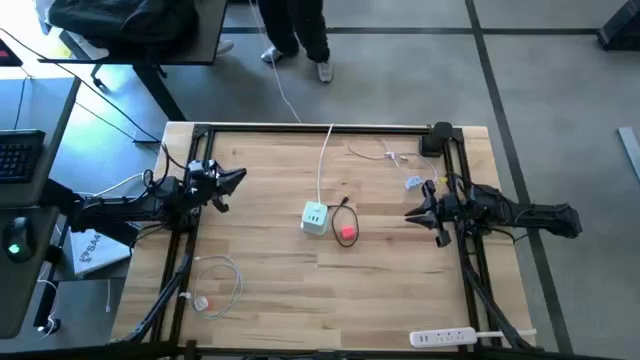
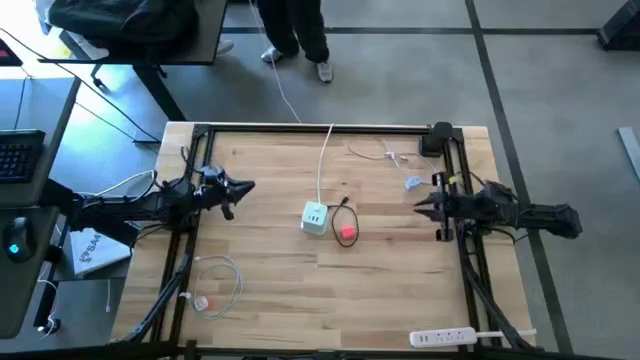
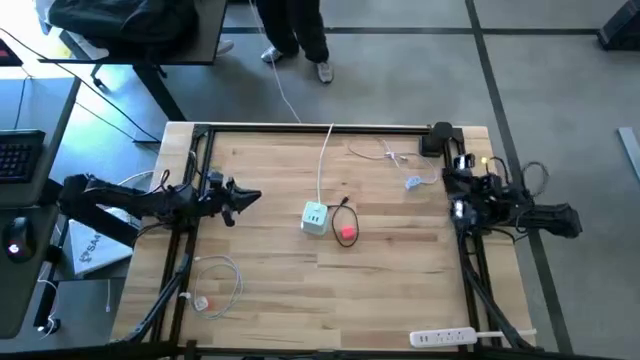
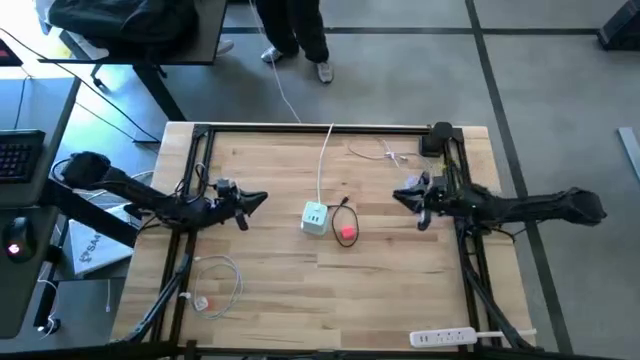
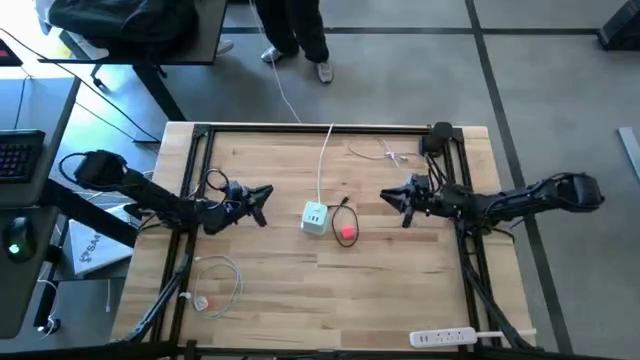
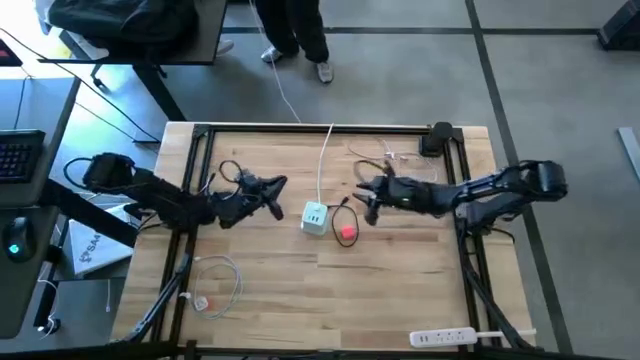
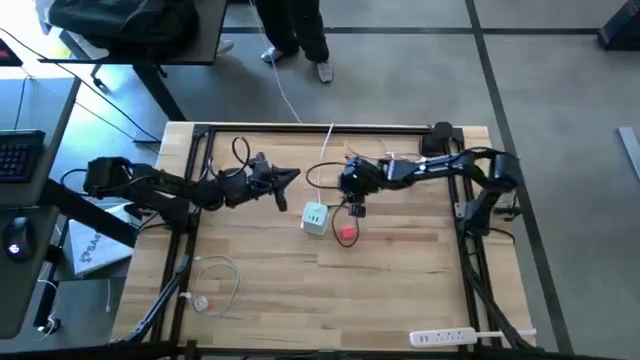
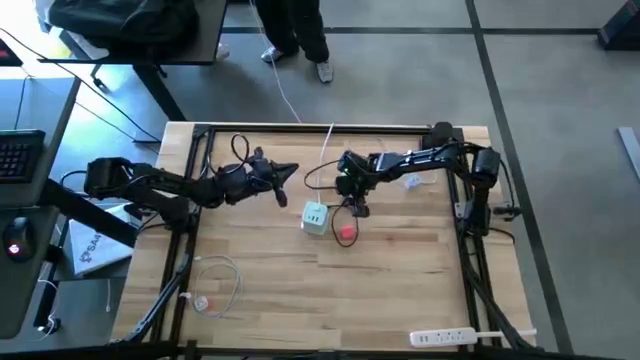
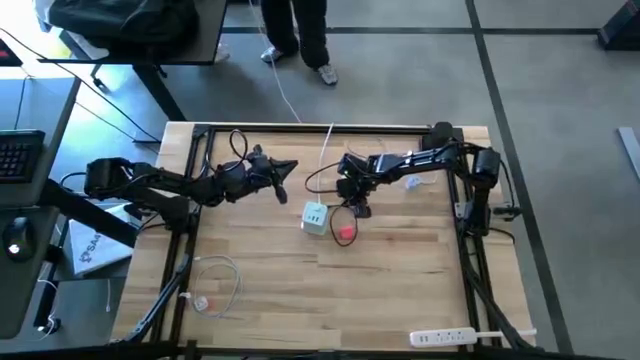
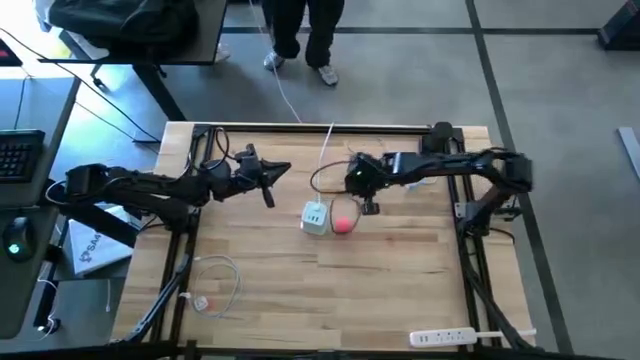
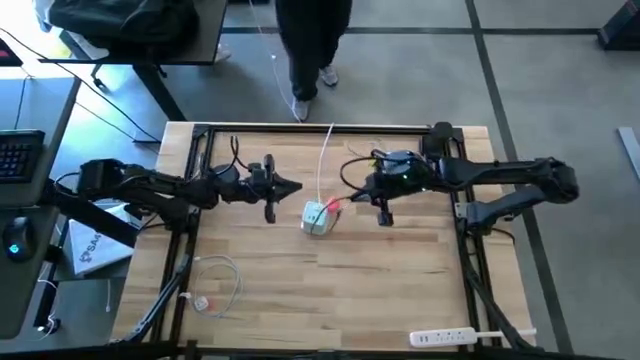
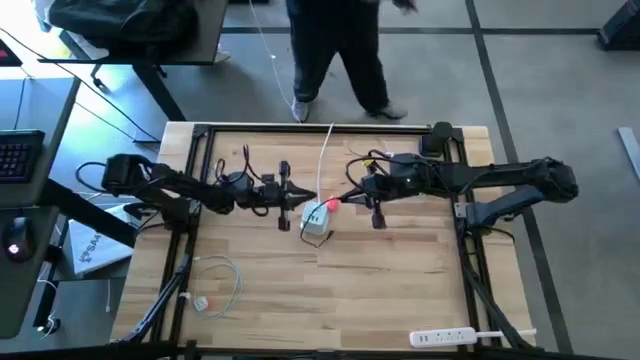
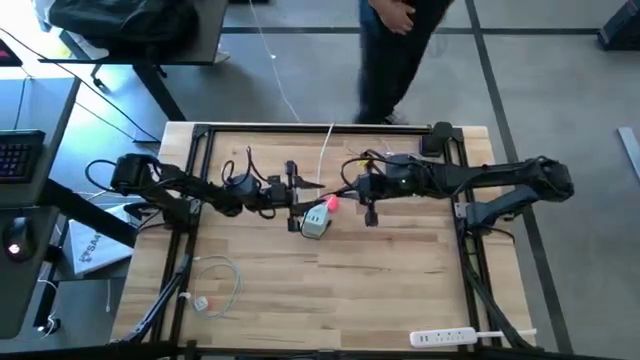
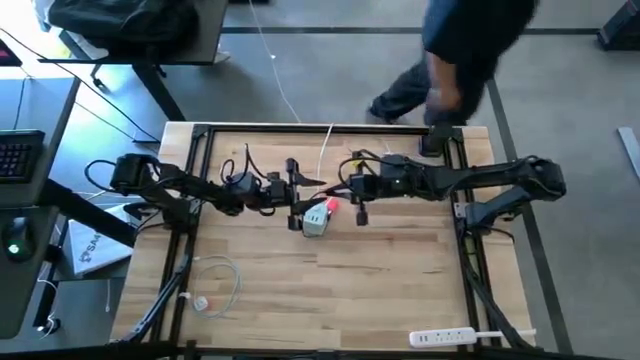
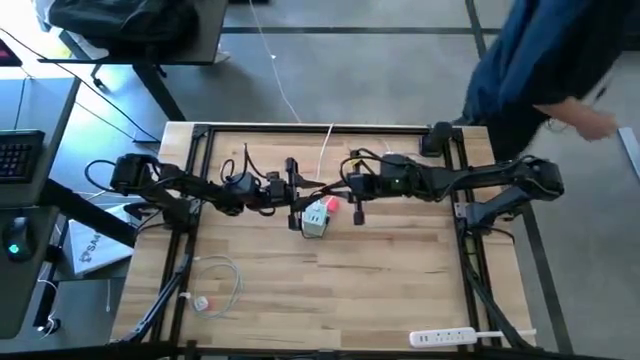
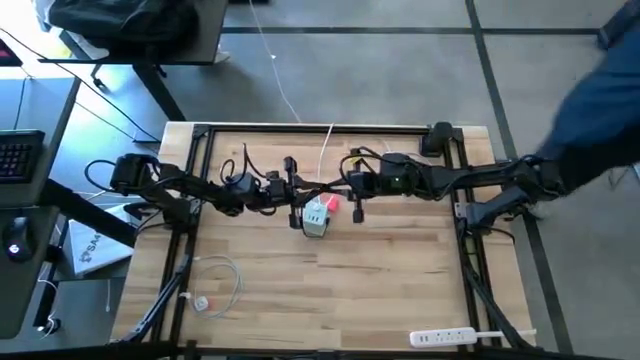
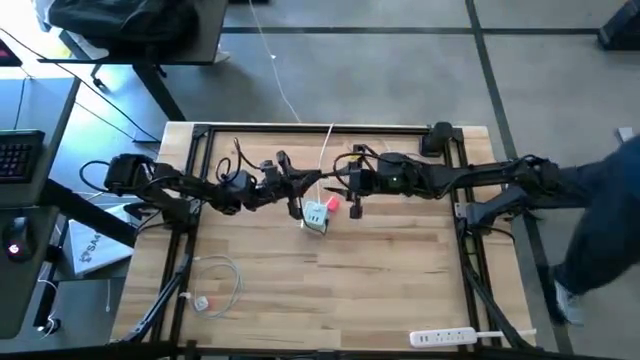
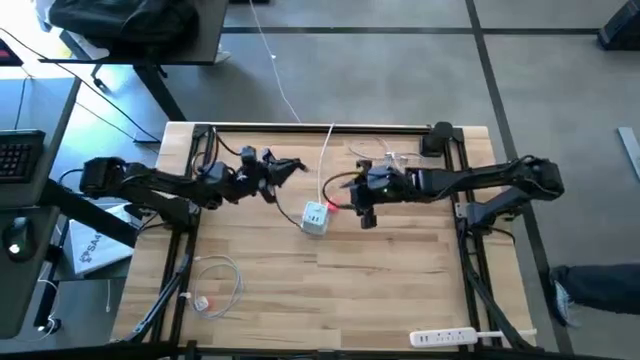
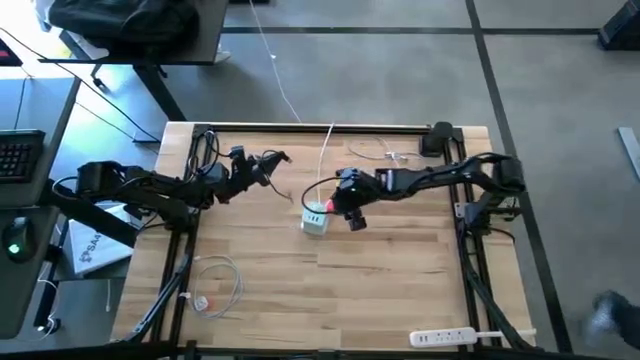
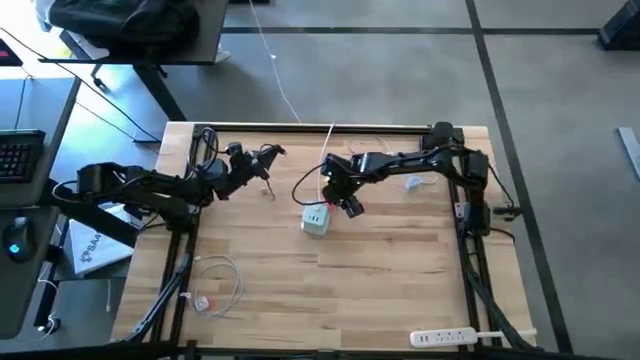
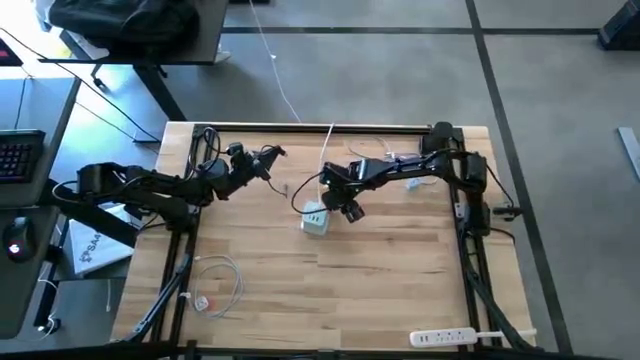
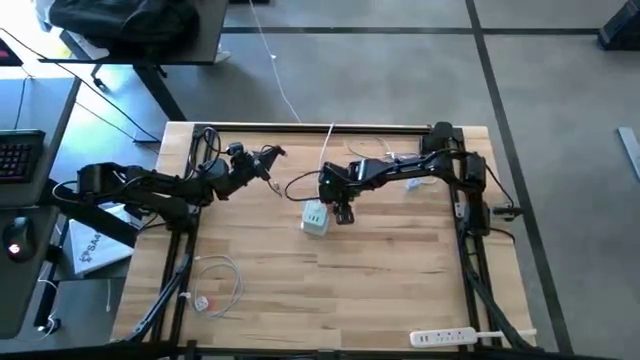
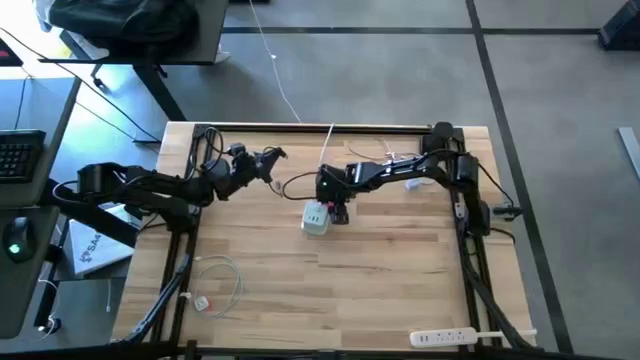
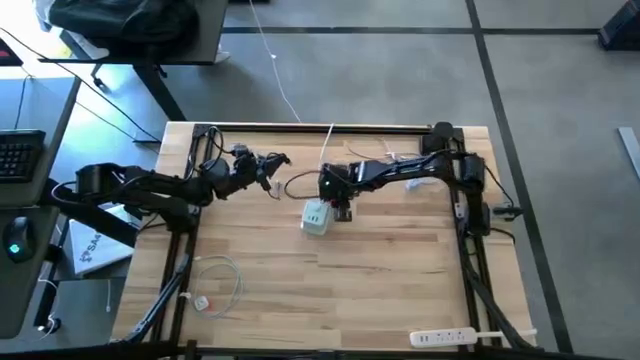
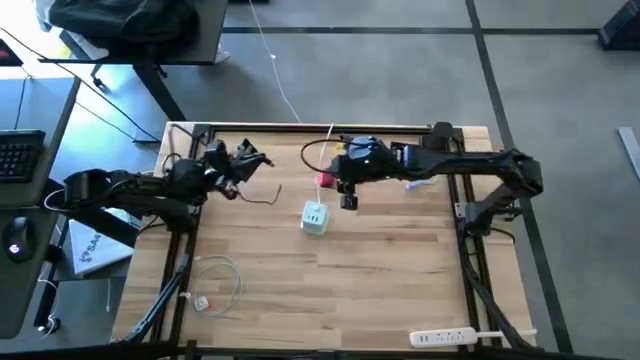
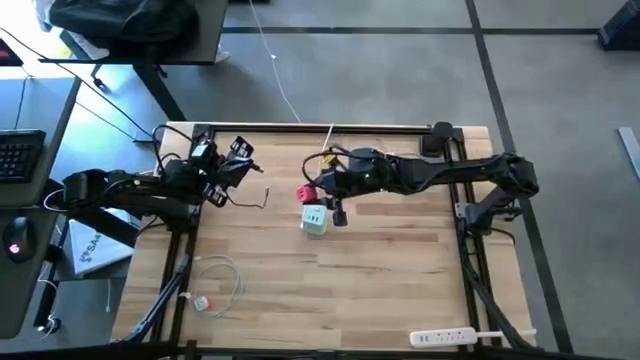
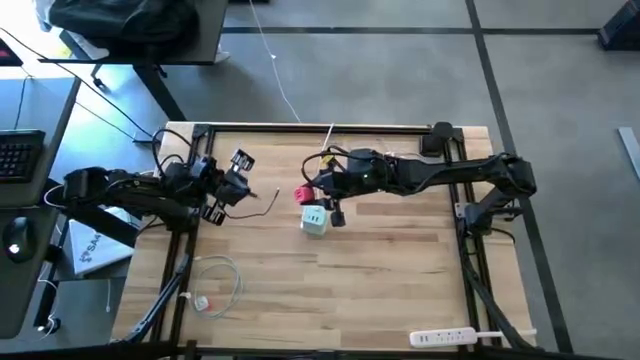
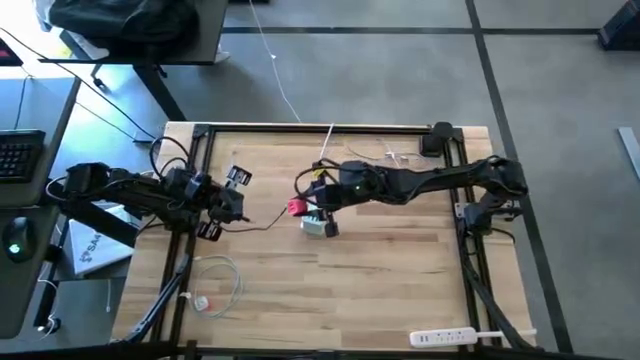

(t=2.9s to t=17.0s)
Task: Insert USB
Insert the black charger cable into the pink charger adapter

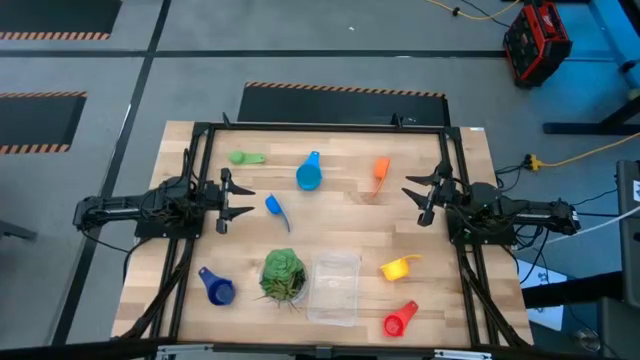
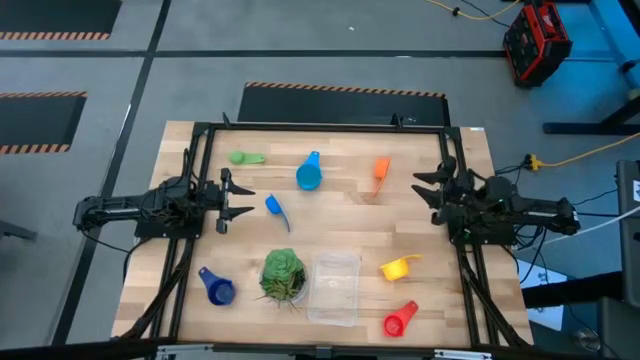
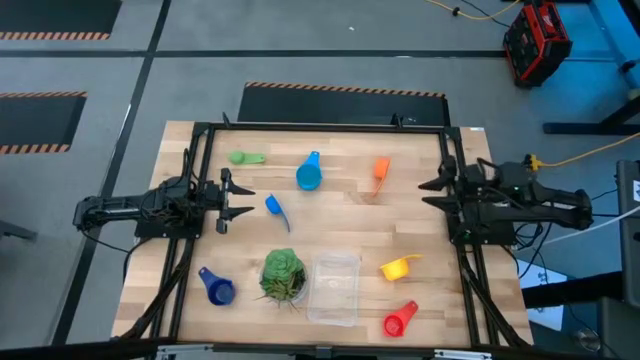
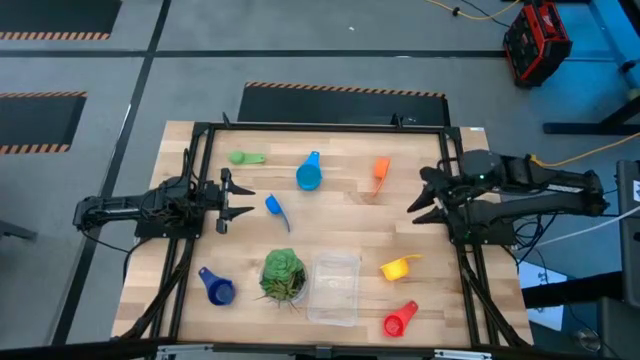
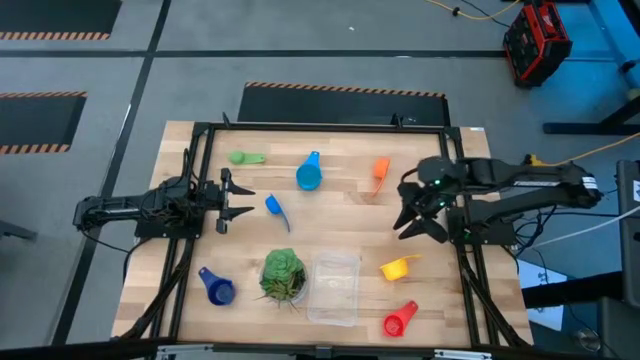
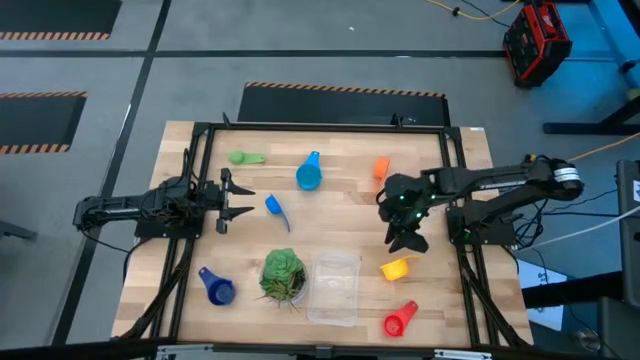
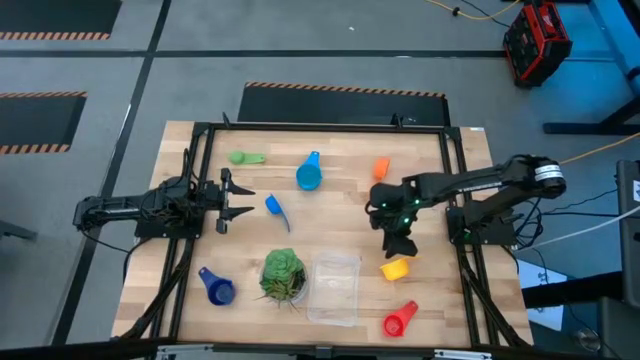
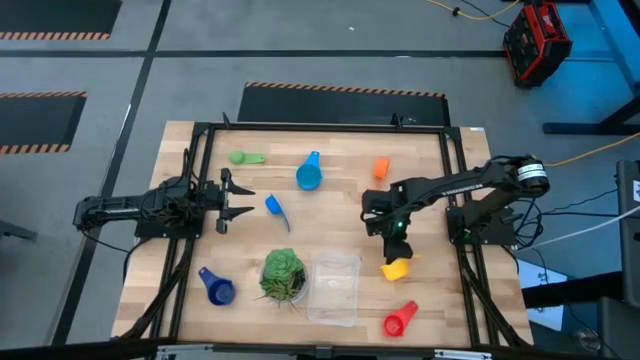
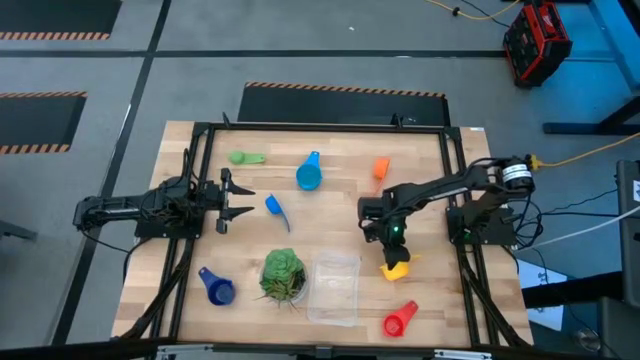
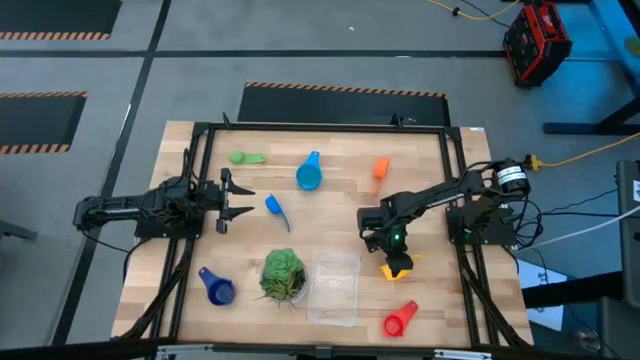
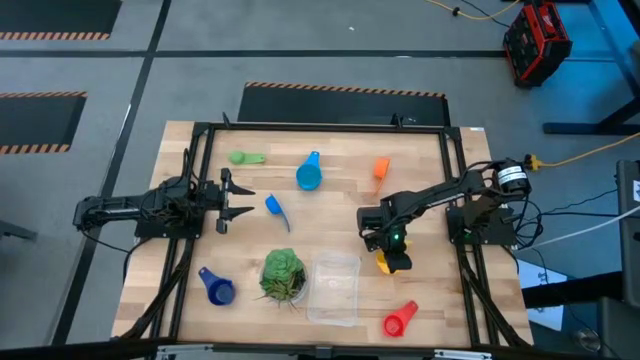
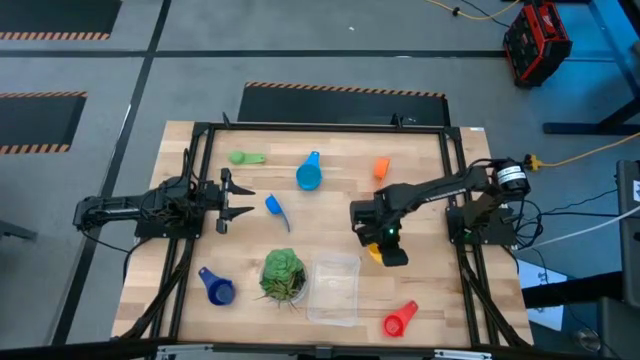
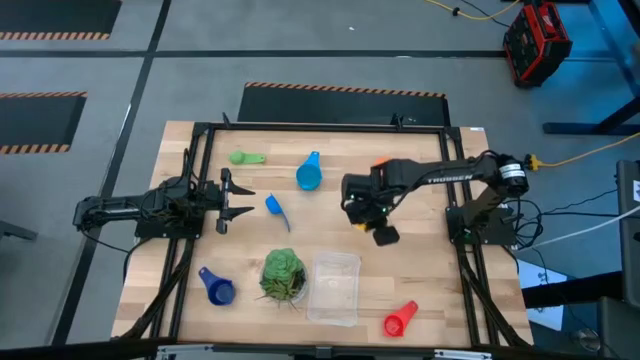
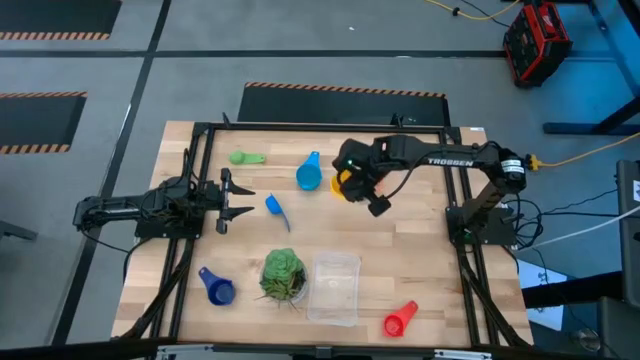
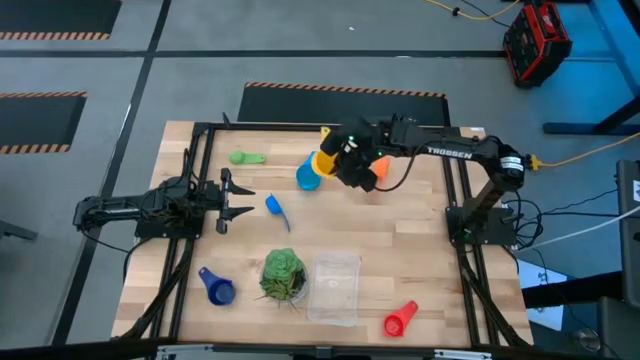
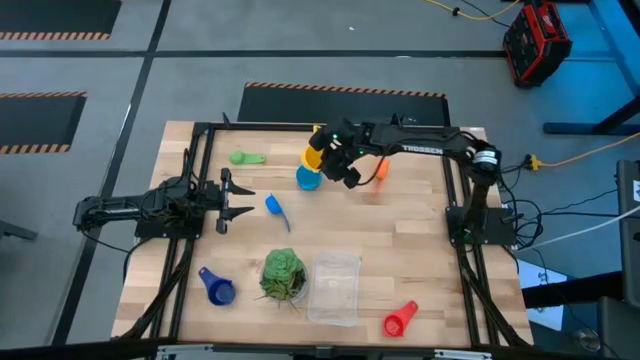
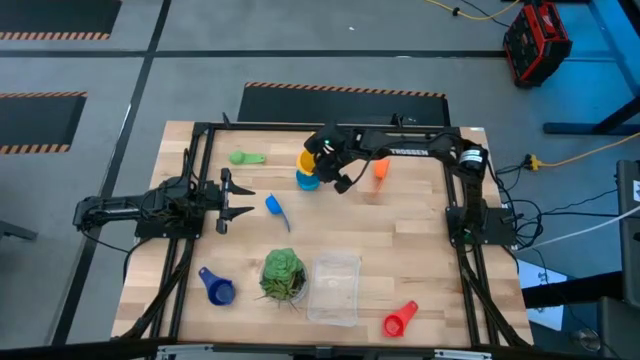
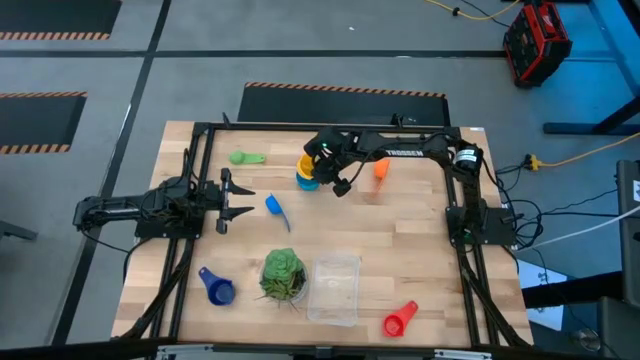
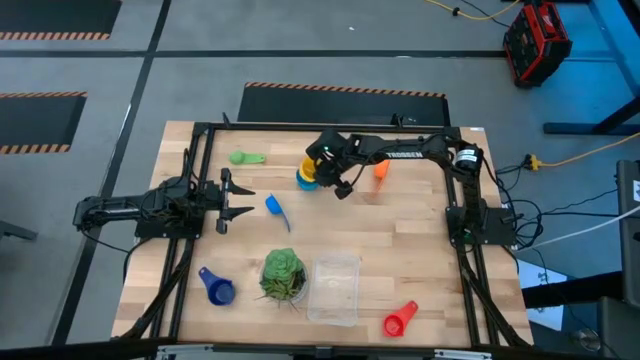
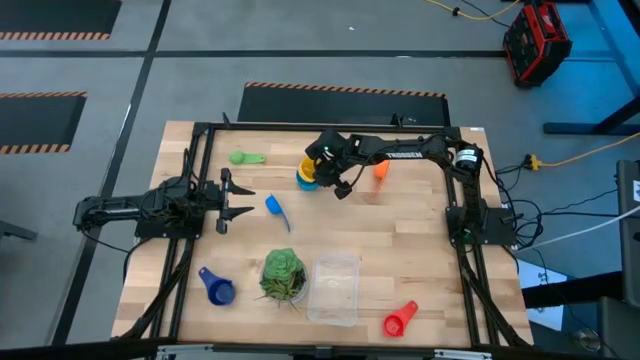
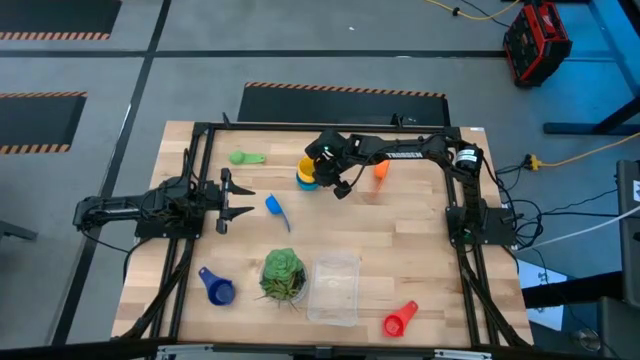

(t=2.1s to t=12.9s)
Task: Nest measuring cups in basket
Stack the yellow measuring cup on top of the light blue measuring cup
